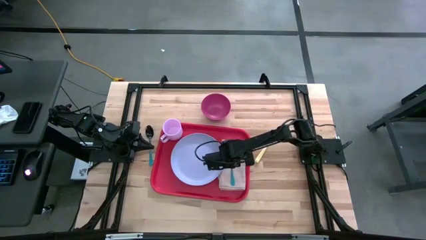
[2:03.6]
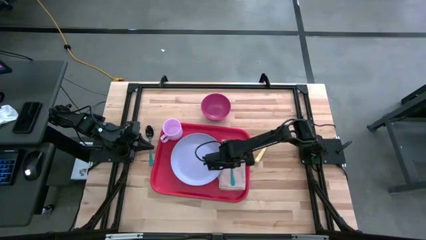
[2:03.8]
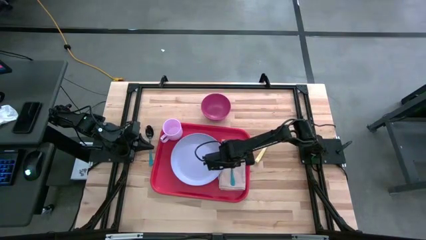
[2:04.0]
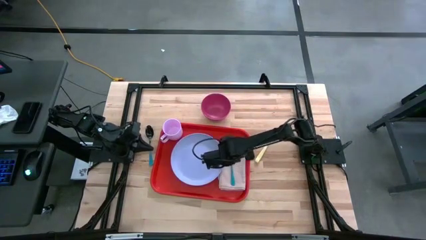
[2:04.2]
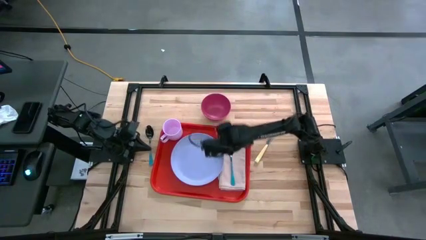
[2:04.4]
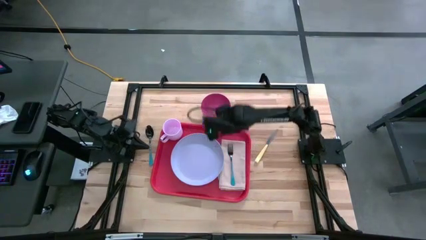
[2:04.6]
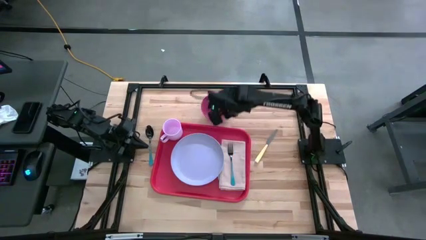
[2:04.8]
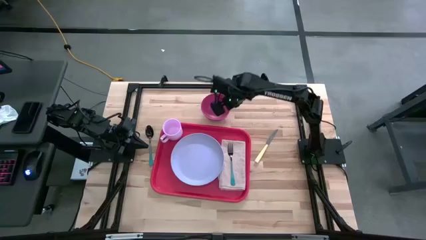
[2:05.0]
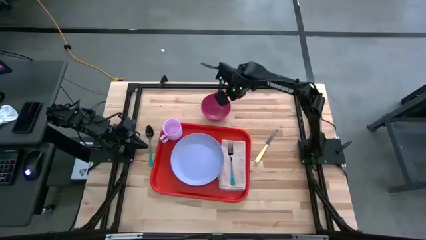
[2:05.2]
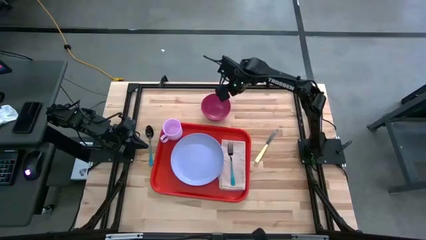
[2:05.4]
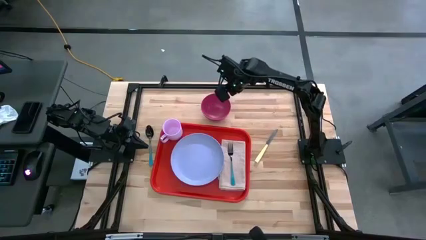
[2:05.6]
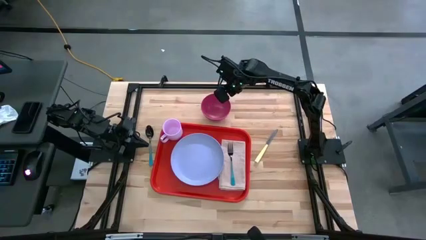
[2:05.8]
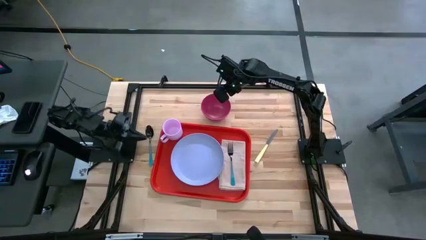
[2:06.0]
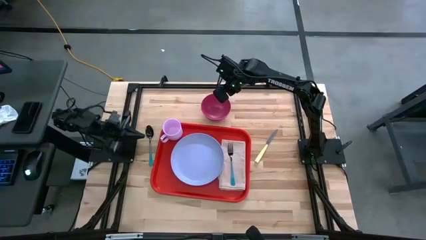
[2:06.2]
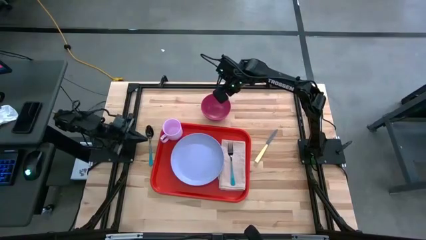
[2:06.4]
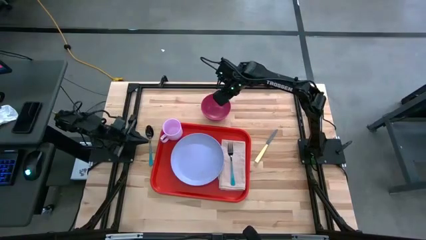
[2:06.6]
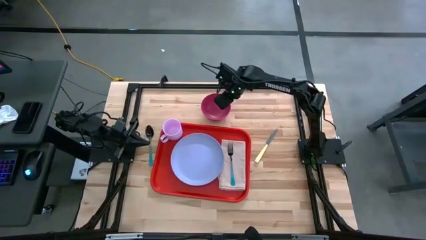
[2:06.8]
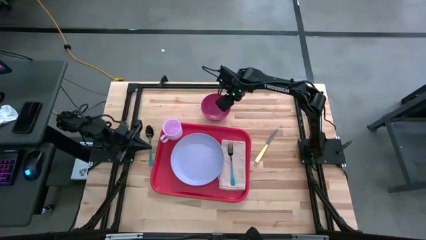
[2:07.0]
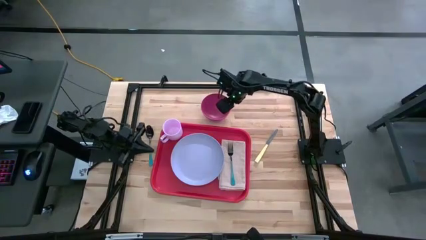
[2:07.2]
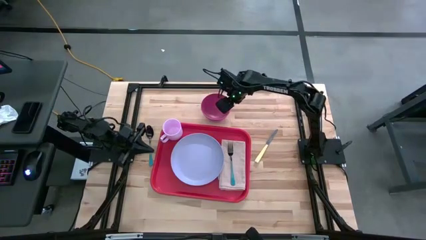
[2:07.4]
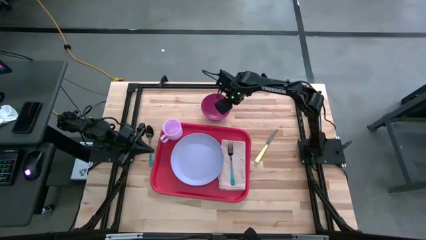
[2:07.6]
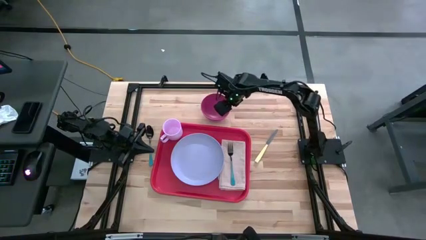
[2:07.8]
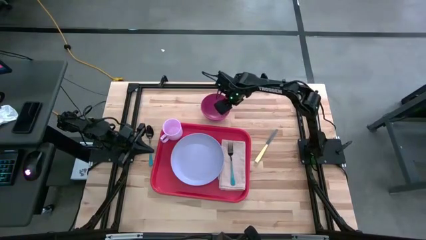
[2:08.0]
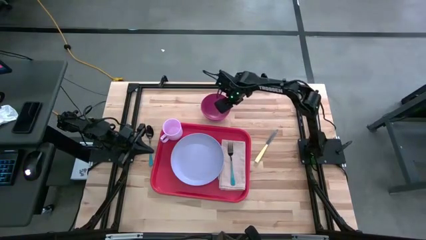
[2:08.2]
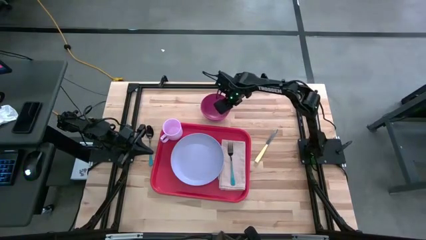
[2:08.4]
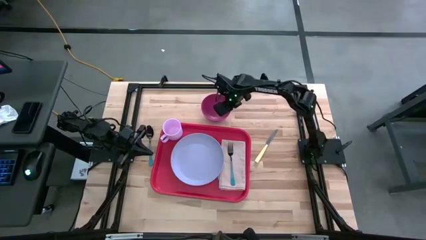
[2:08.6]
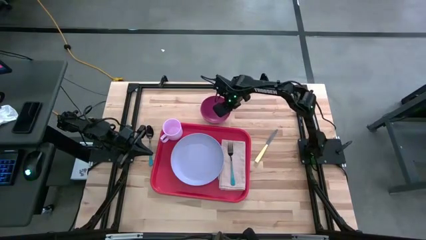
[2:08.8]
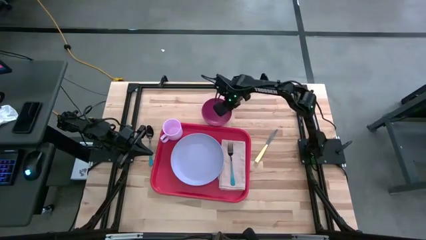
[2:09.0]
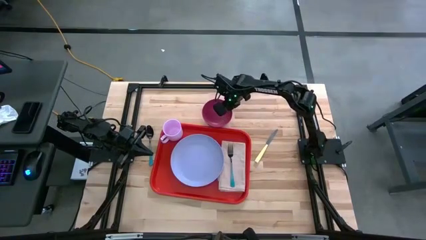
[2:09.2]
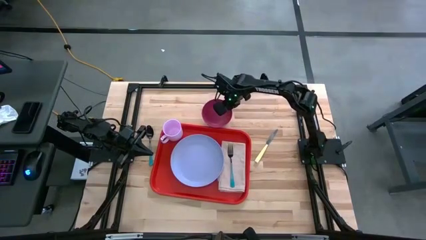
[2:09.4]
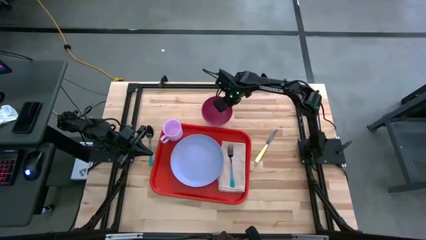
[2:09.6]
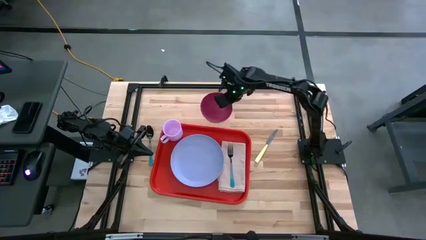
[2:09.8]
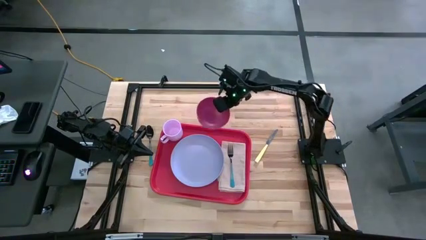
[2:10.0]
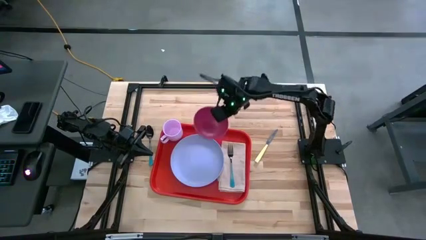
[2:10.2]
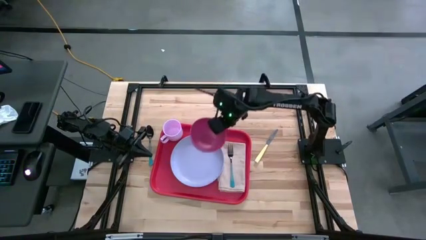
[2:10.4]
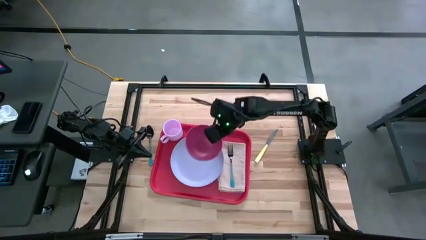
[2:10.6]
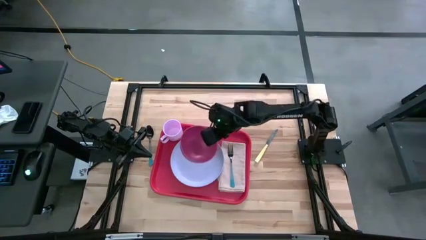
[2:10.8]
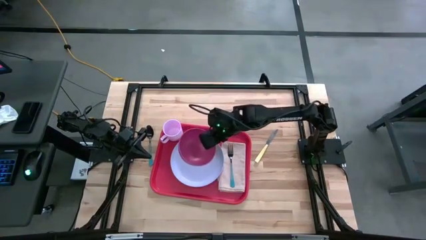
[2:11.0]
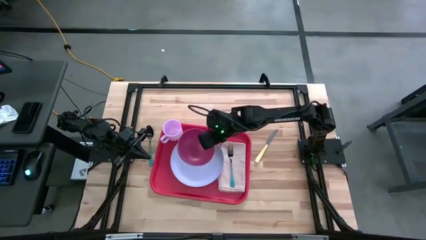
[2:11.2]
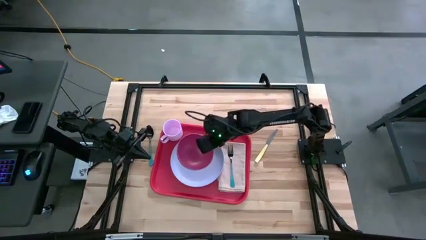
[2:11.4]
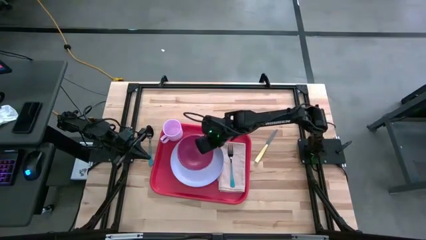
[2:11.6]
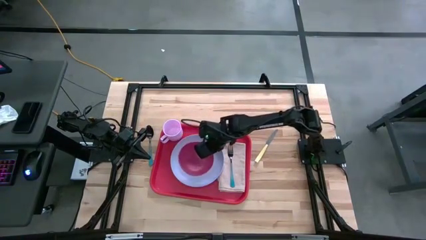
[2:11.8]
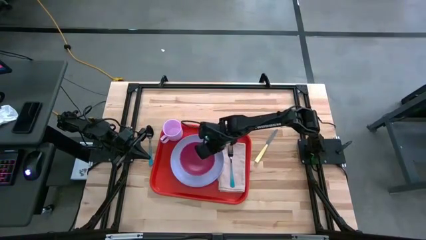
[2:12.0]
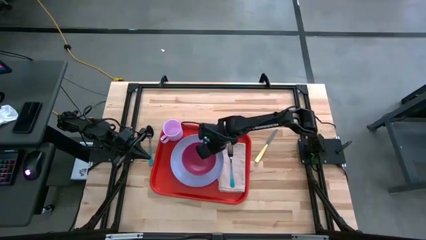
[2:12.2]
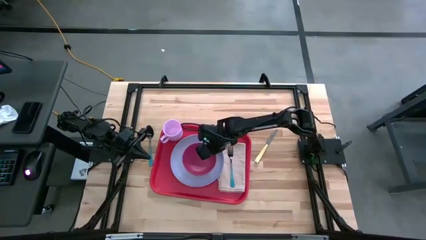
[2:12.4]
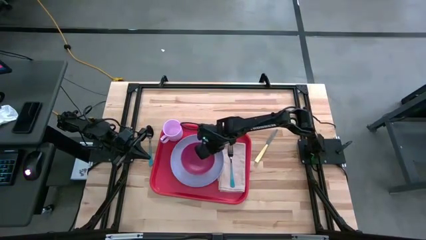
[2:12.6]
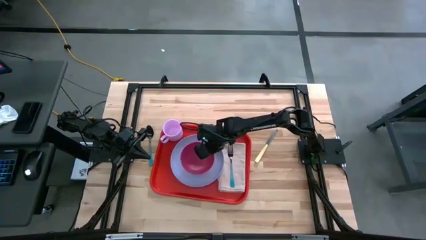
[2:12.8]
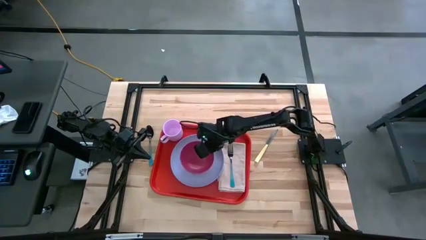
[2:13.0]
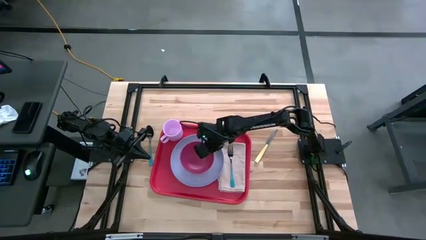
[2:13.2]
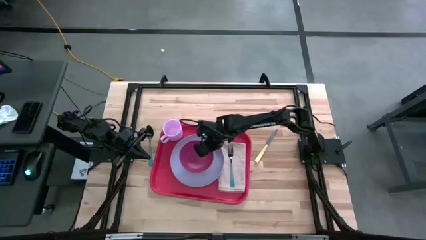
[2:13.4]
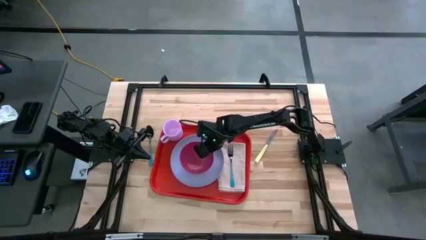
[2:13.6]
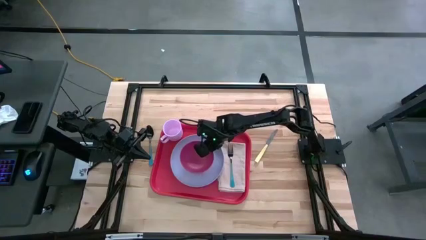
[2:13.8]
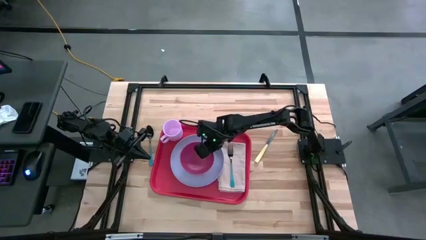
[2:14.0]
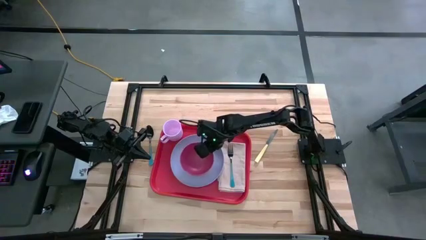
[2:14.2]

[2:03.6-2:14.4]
Task: Set up tray
Put the red bowl on top of the blue plate

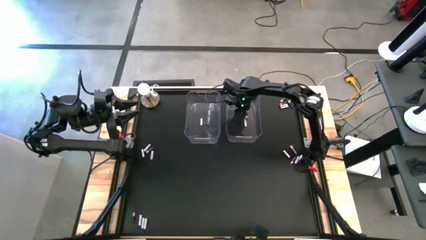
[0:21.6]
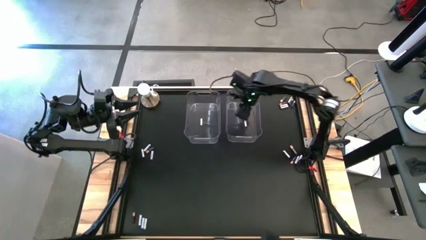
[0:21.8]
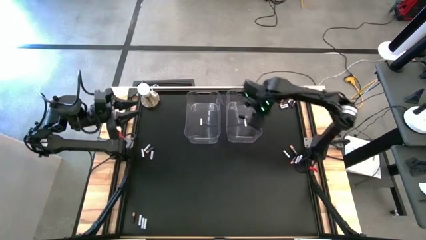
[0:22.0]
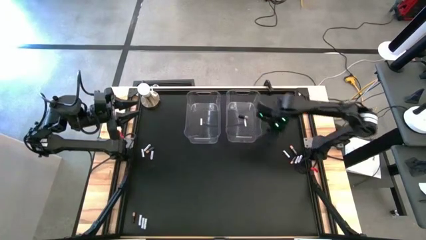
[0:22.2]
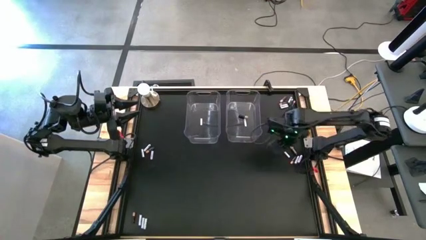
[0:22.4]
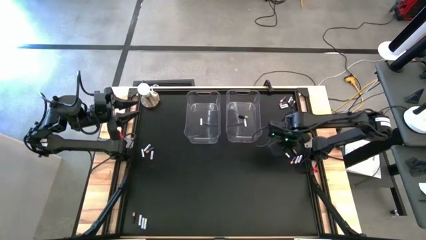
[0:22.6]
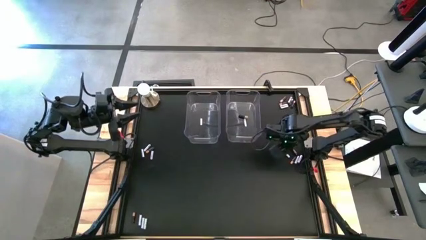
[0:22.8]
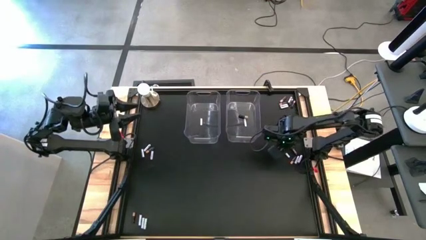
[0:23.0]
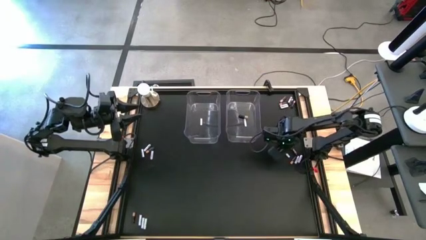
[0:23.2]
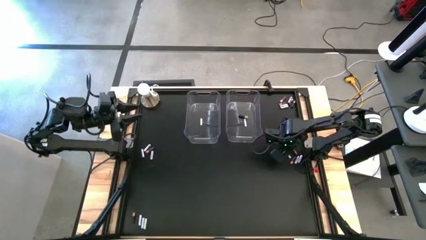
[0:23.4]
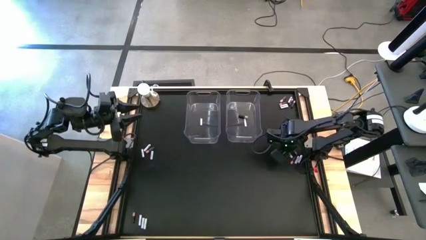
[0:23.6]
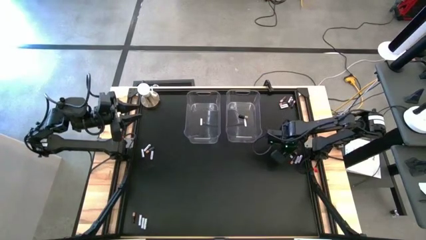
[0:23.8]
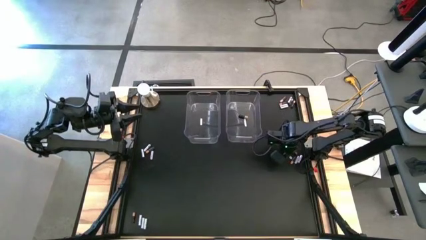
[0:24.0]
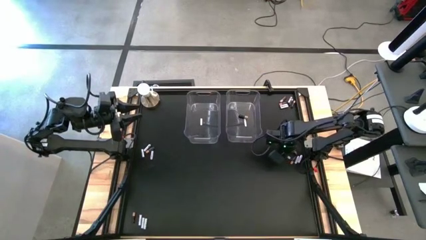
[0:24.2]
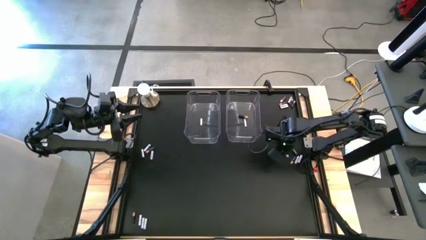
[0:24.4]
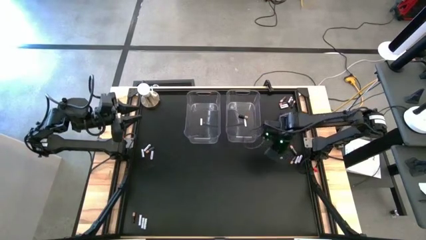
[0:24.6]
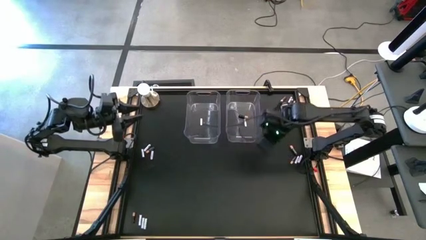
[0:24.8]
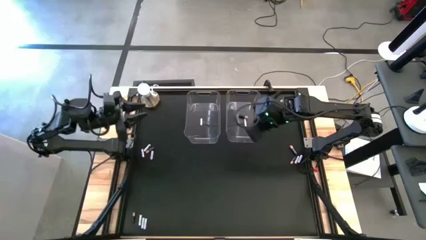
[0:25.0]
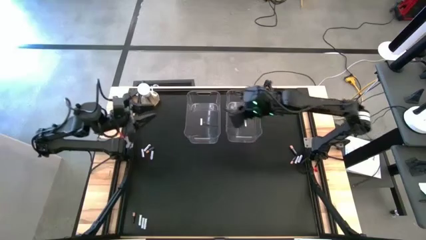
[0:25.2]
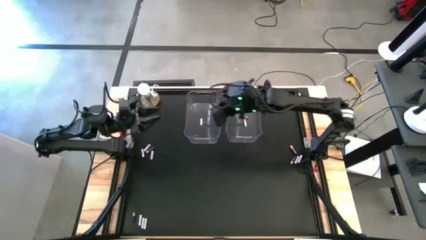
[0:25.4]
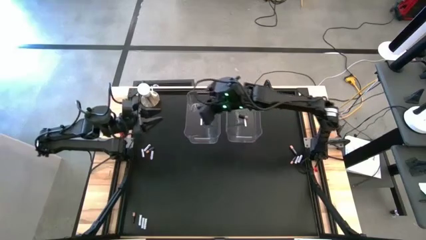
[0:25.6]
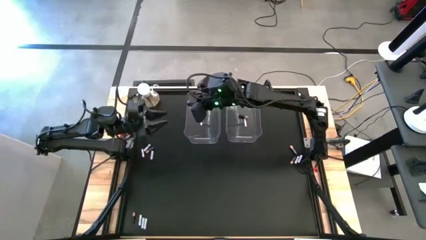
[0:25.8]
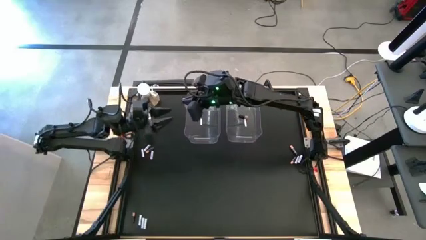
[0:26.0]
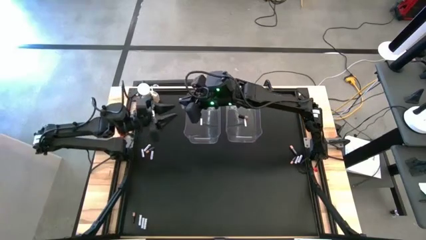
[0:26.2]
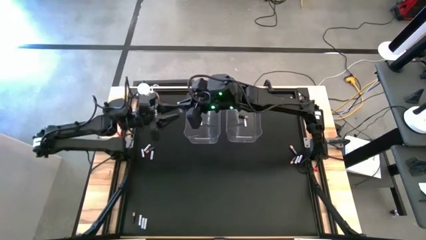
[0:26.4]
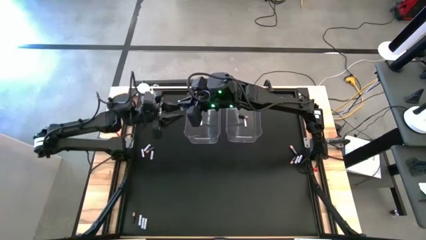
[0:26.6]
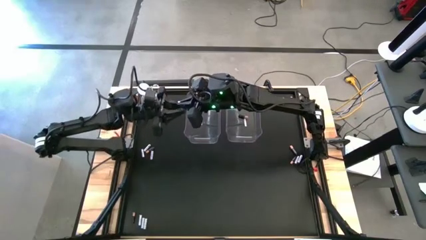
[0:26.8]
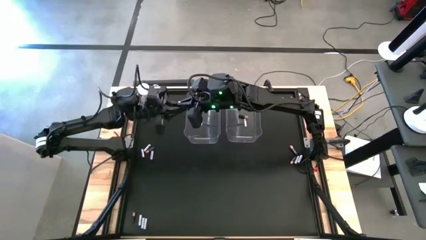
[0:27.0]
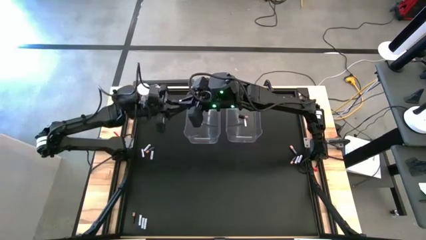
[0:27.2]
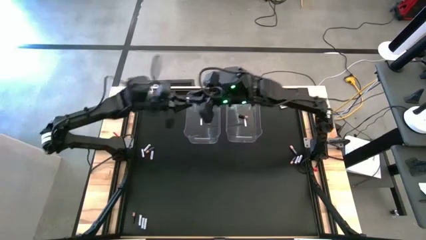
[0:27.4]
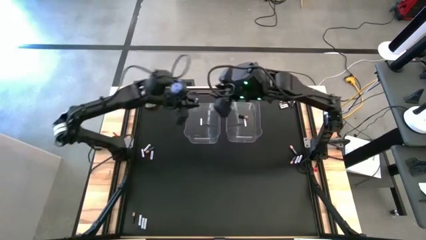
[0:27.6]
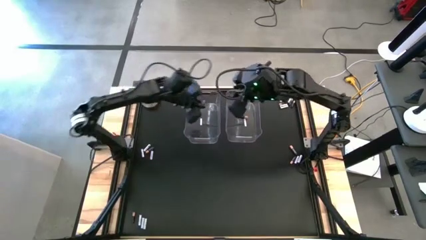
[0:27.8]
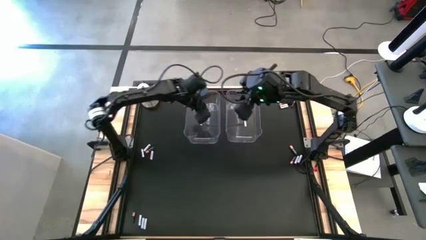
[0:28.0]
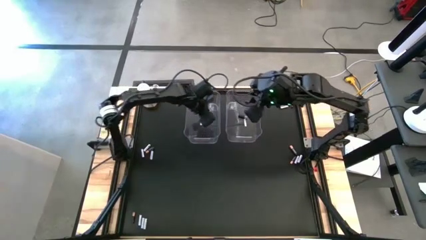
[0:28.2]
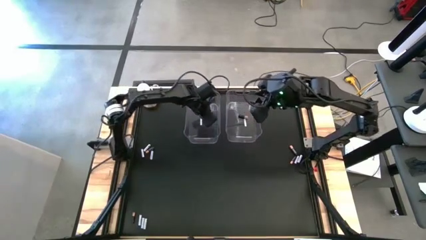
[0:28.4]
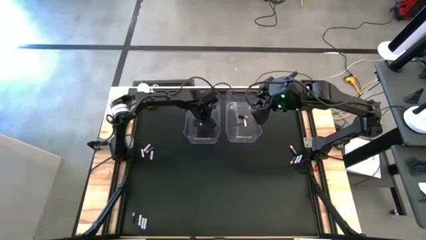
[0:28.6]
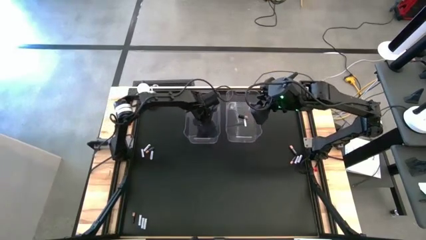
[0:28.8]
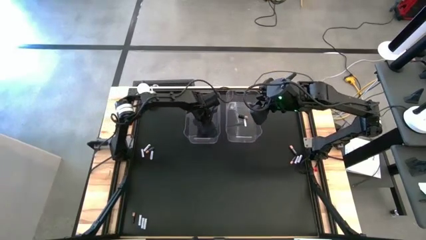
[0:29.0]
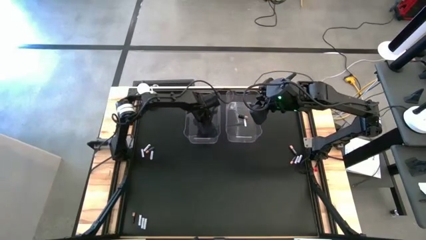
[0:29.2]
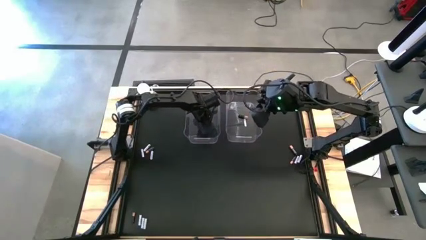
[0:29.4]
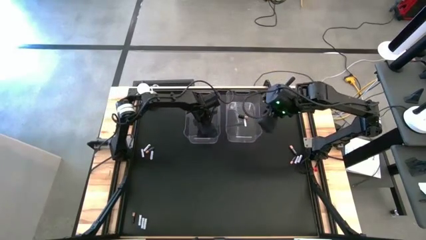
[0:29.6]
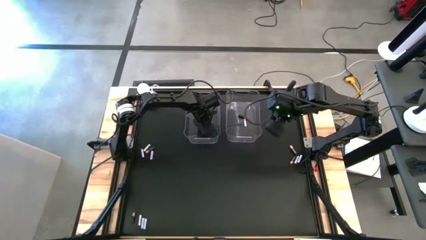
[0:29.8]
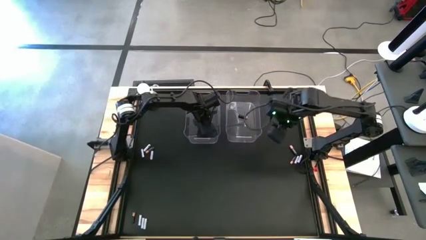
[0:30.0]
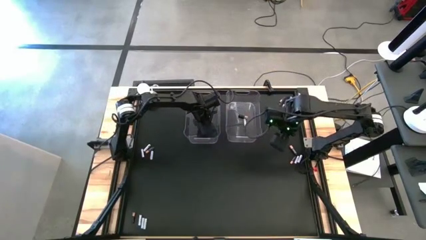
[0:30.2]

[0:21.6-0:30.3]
Task: Sort batteries
Put the white battery into the left transparent bin
